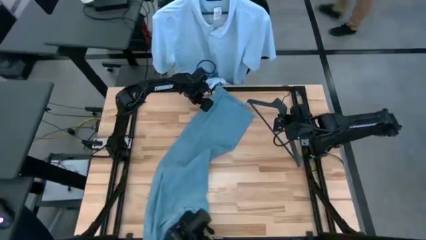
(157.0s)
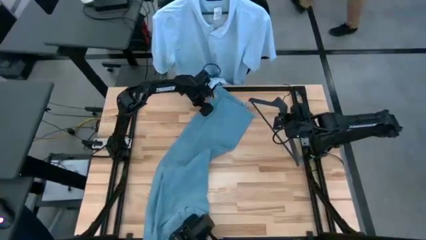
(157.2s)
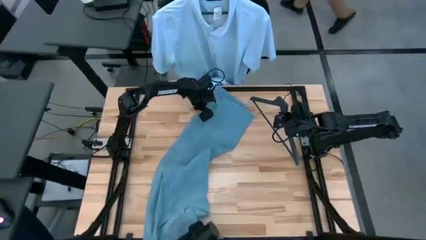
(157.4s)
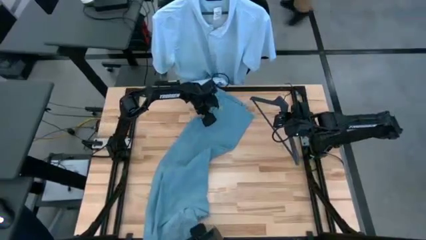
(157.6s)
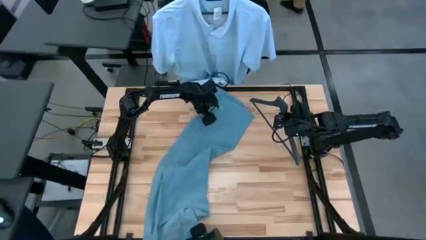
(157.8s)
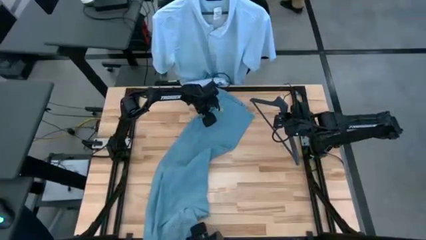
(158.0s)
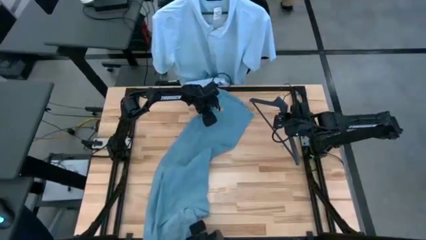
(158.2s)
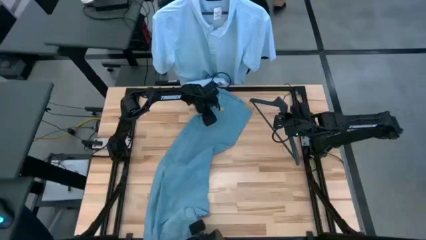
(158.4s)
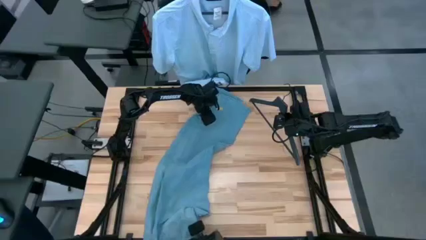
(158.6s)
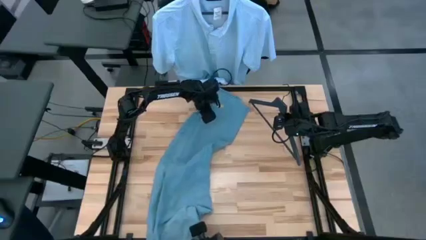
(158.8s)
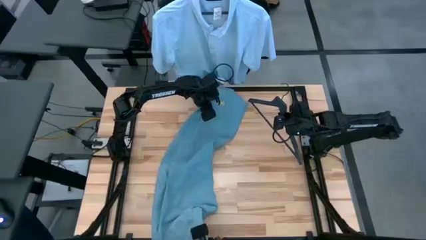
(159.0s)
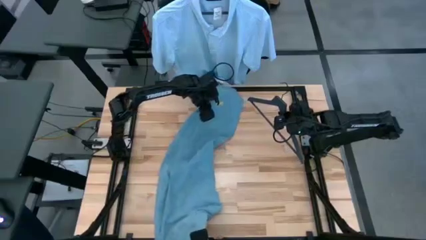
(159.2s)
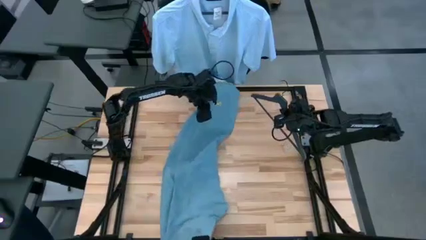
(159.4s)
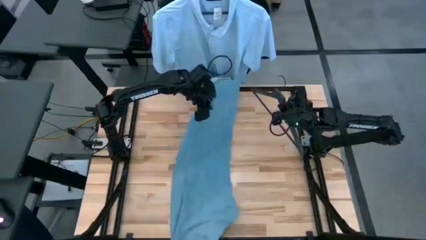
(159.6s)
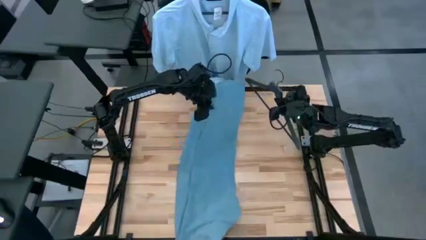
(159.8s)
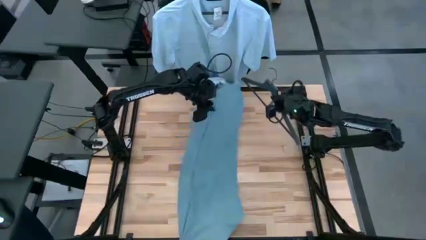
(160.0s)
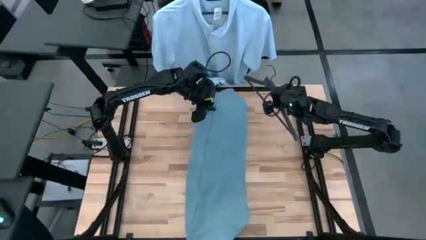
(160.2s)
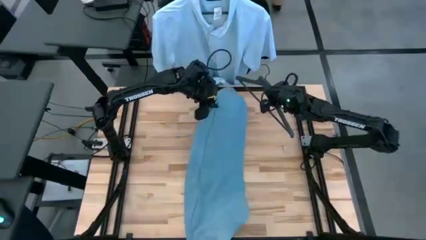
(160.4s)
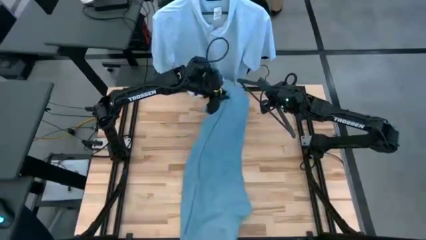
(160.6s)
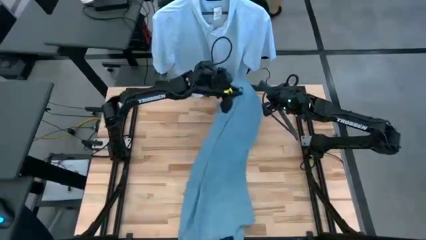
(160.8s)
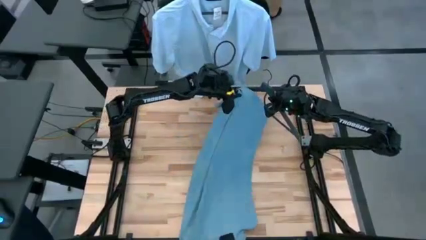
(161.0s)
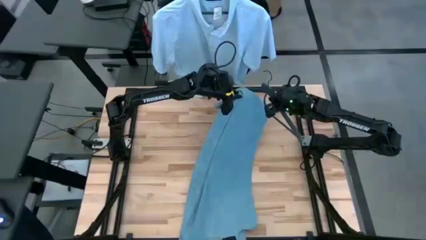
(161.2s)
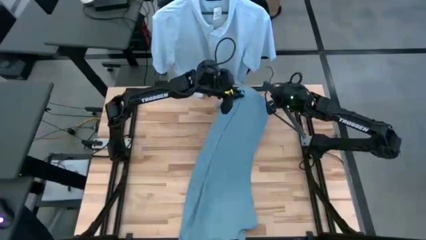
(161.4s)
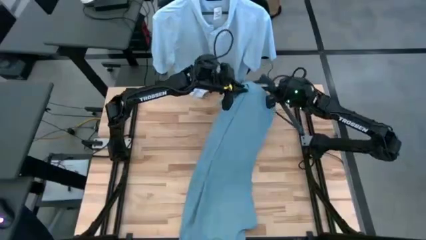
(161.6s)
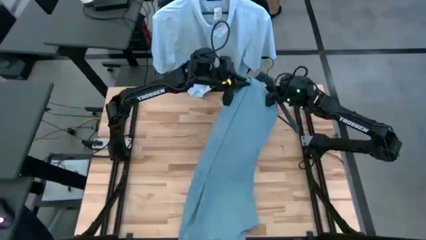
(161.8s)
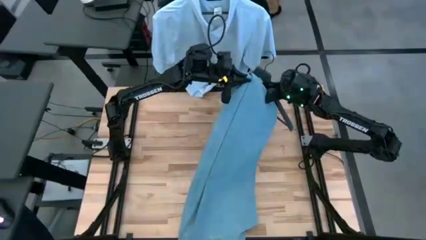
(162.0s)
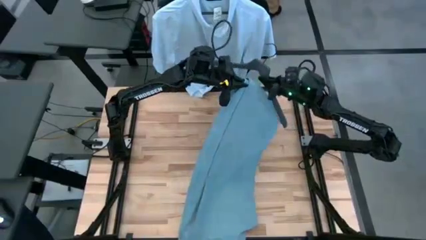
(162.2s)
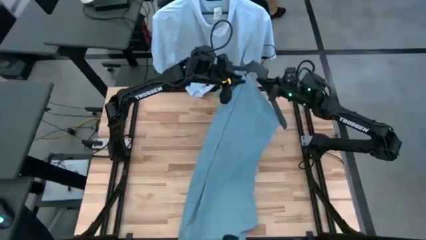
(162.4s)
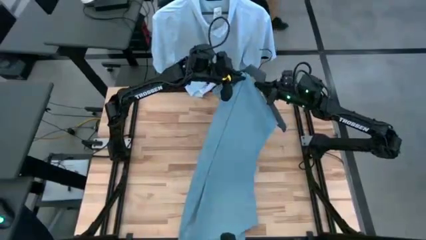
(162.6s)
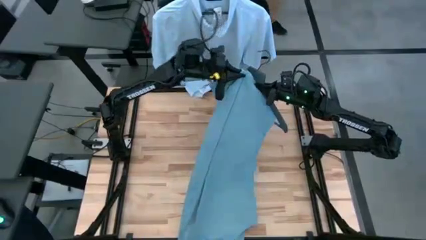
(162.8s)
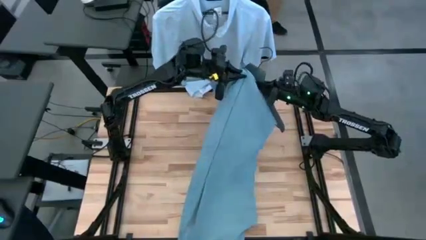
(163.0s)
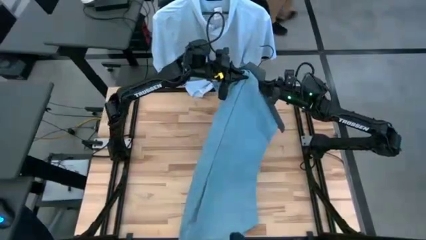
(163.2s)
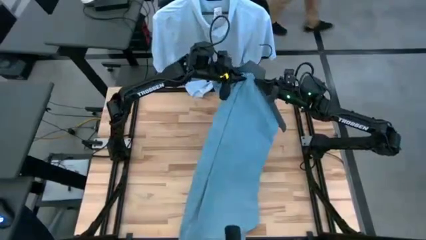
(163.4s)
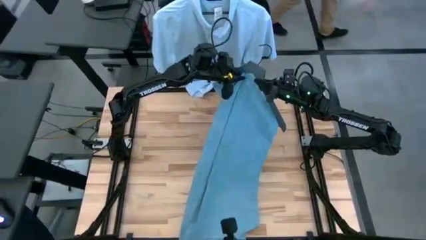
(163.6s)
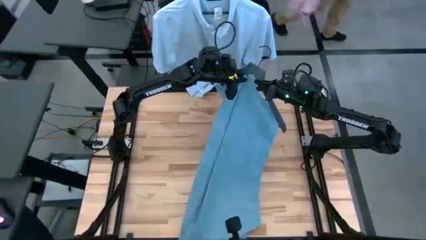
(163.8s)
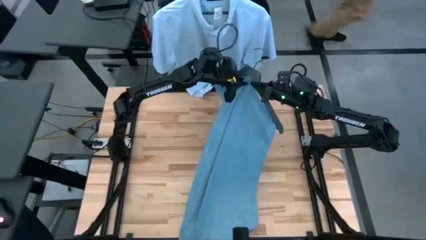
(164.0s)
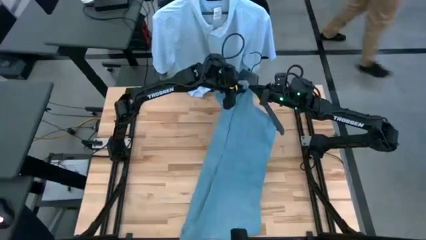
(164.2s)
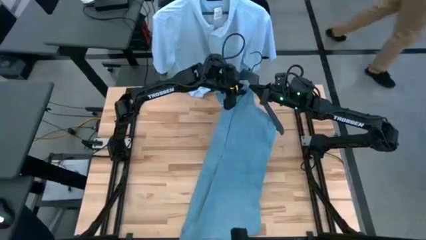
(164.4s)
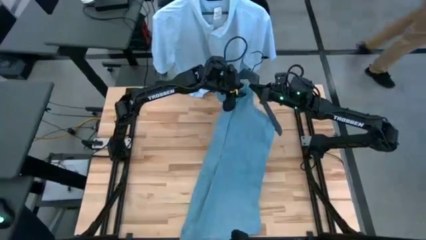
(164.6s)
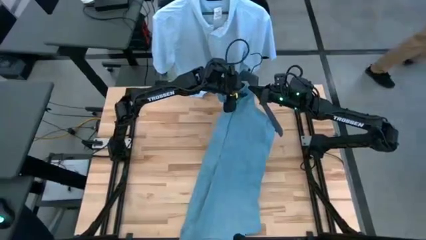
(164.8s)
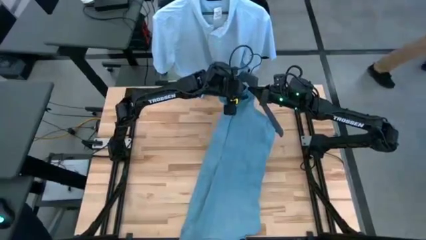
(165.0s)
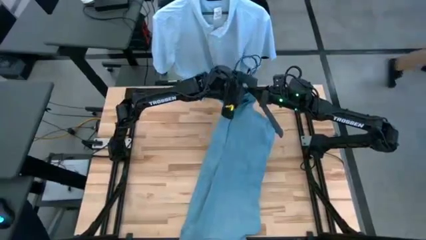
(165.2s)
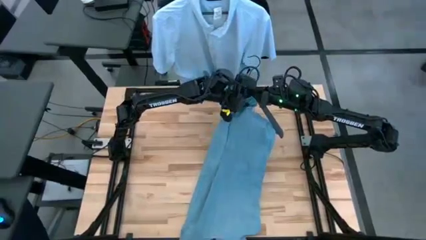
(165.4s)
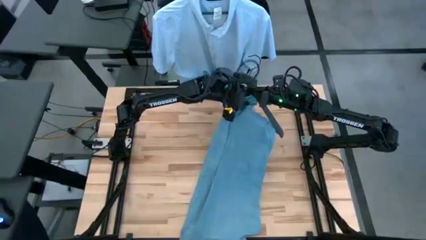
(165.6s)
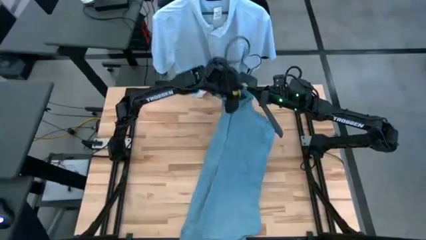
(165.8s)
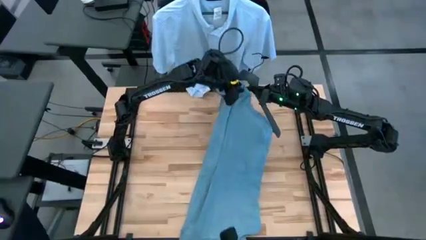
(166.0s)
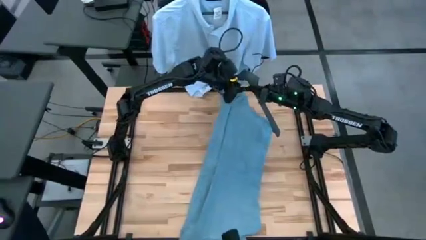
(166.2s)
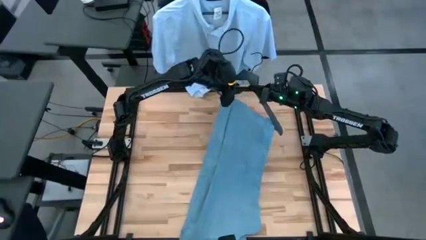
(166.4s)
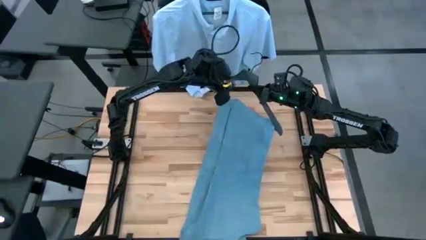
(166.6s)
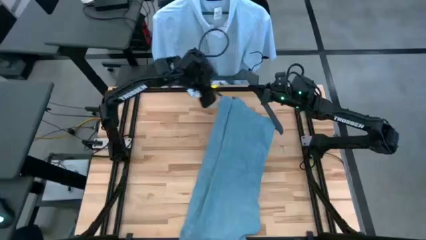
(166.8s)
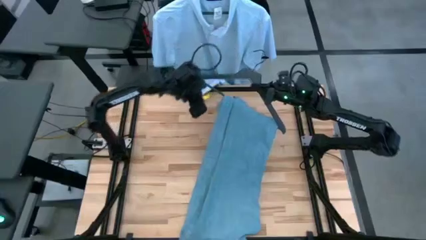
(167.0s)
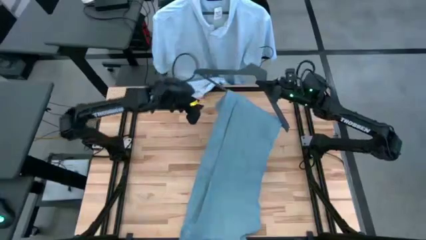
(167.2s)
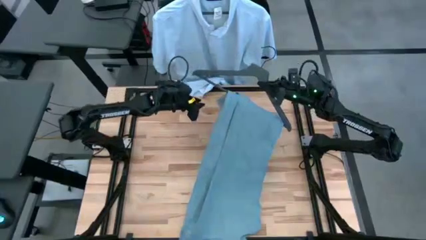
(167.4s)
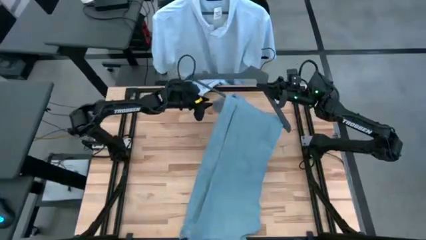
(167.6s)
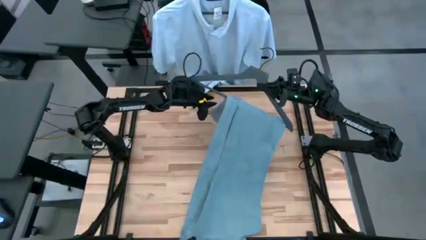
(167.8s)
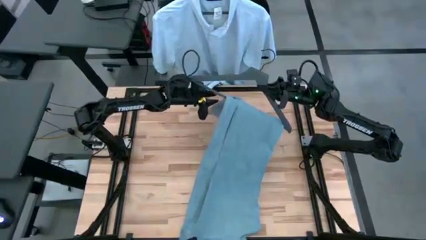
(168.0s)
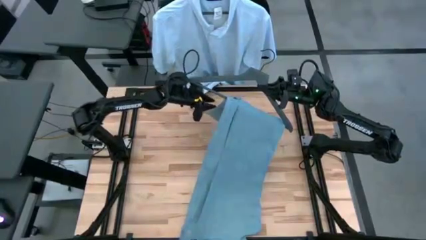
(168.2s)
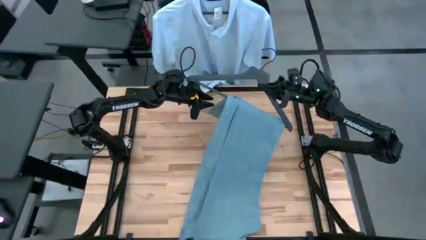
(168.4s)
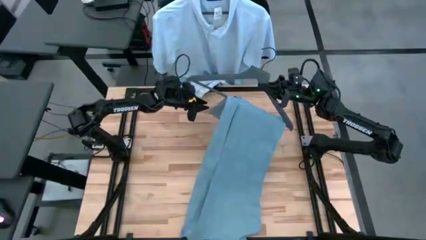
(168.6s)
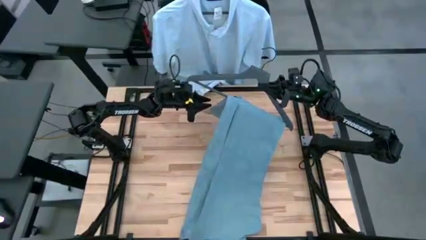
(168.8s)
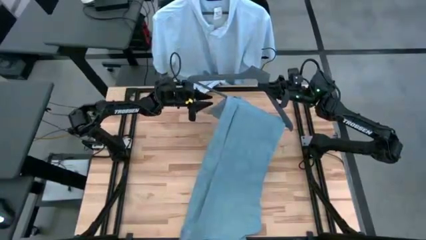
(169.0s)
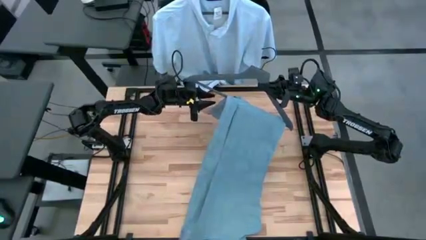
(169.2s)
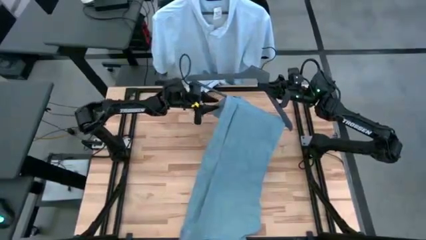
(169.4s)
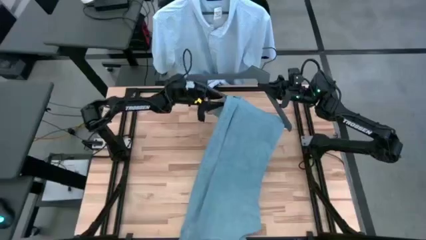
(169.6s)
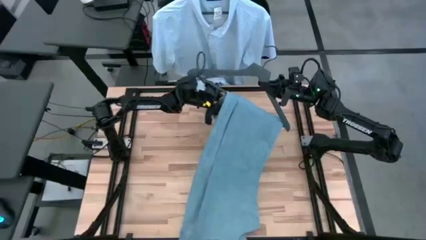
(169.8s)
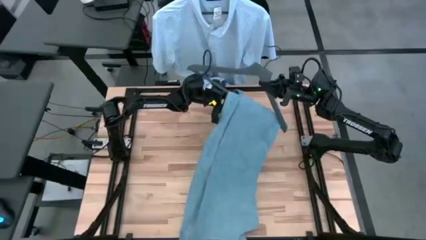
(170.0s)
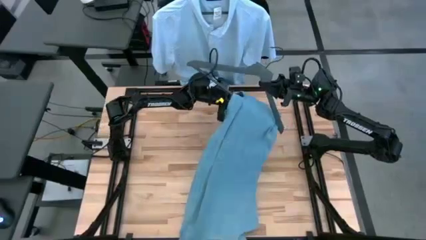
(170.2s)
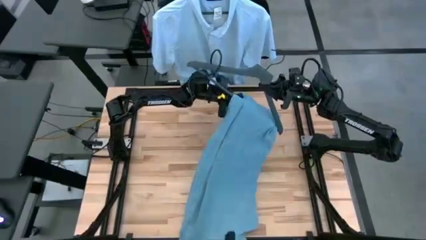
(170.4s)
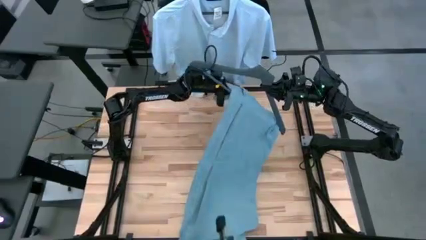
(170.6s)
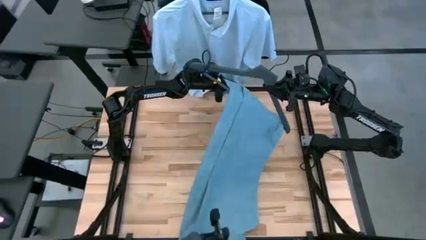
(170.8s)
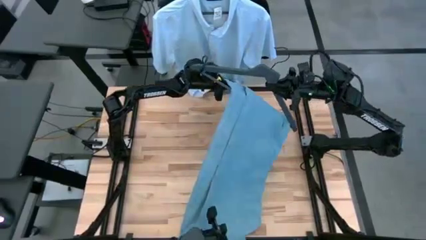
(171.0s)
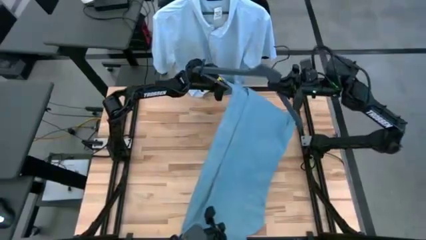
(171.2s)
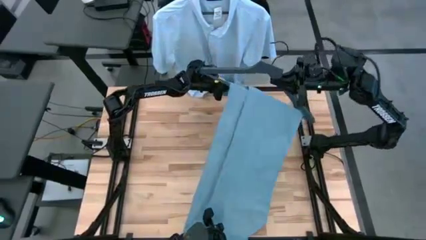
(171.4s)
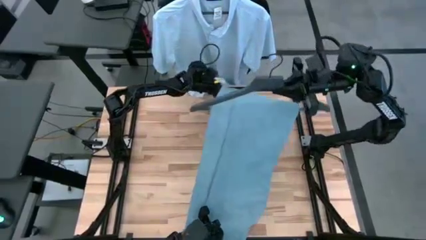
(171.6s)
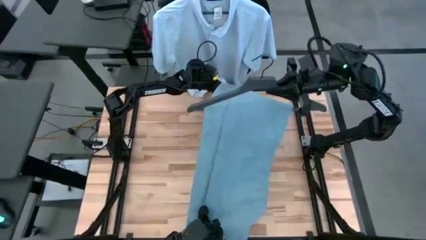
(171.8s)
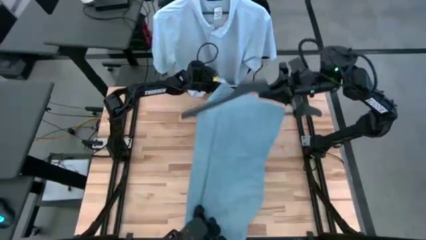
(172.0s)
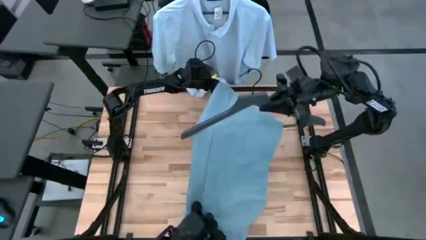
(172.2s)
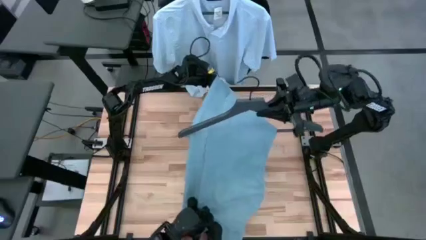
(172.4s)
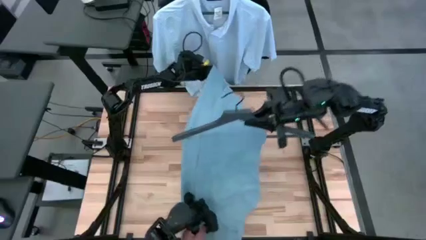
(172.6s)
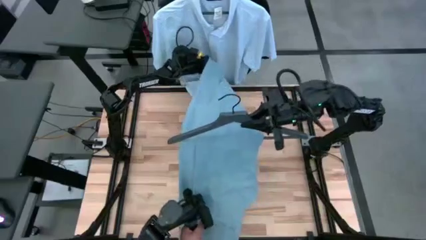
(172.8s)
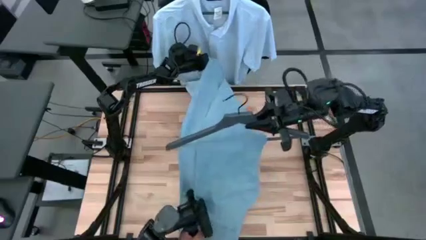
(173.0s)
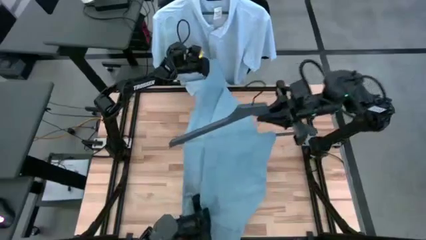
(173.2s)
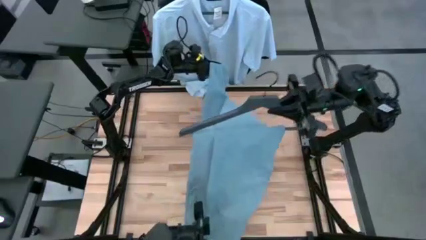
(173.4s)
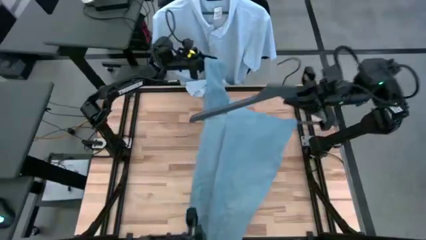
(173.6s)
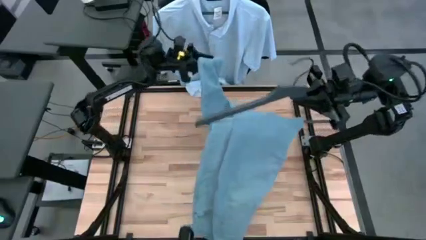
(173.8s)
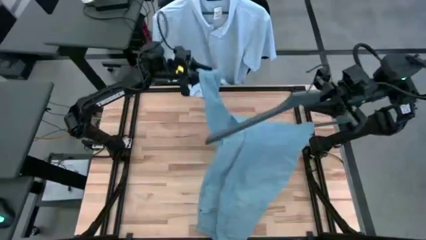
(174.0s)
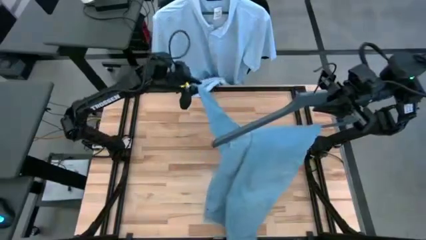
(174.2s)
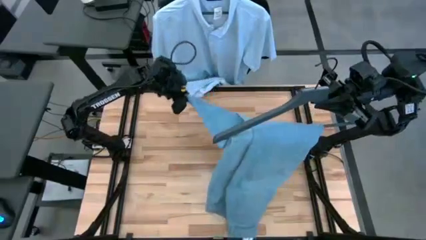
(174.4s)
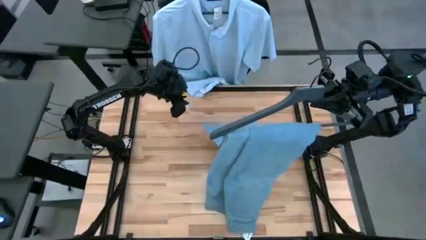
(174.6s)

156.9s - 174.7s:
Task: Hang clothes
Insert the blue jeans on the grey hanger
